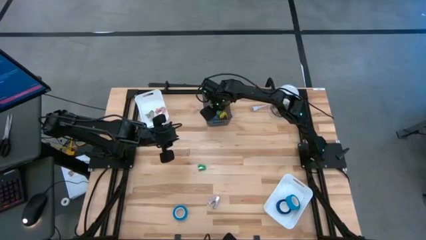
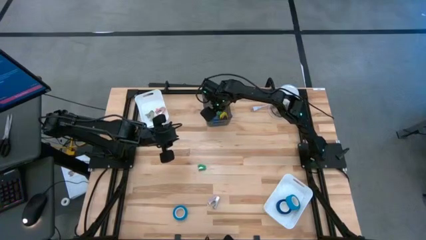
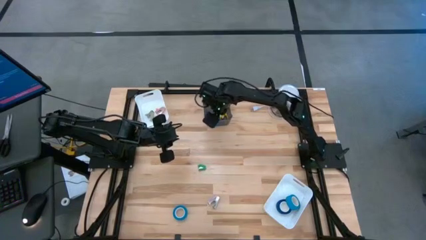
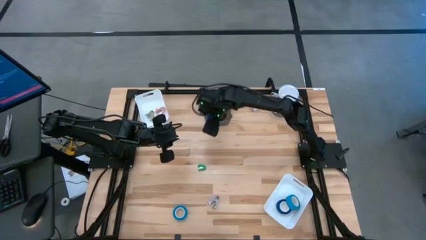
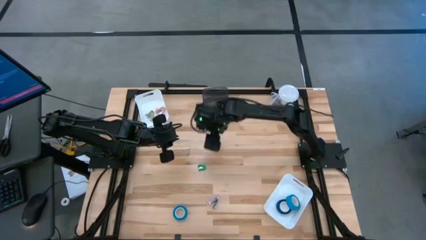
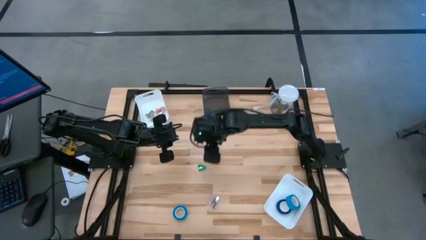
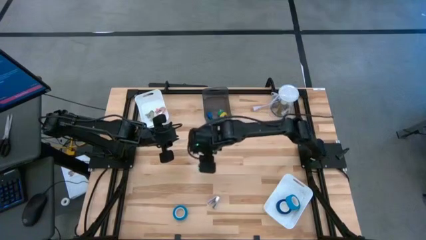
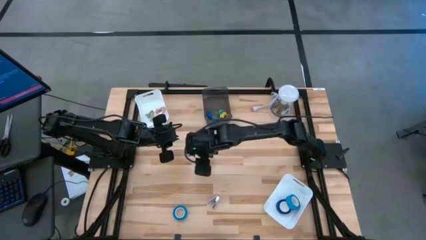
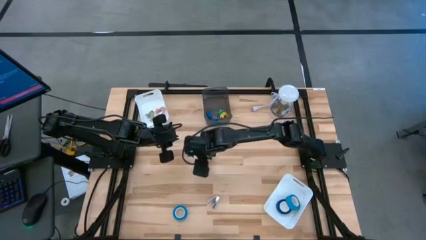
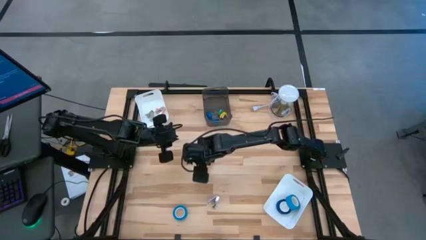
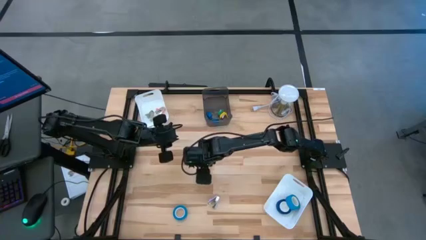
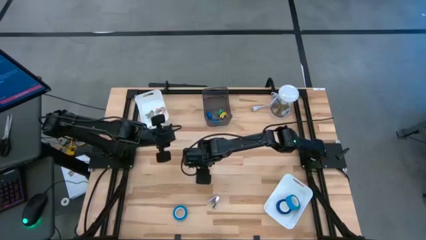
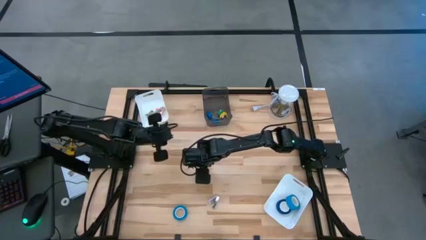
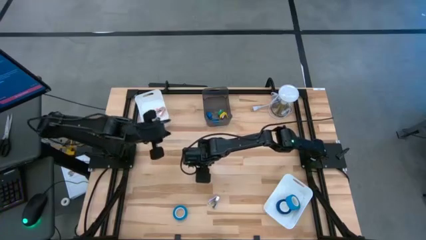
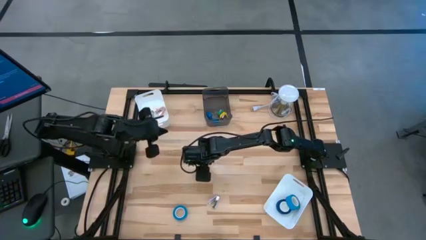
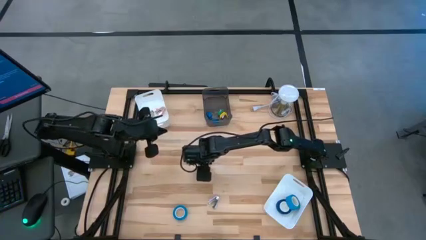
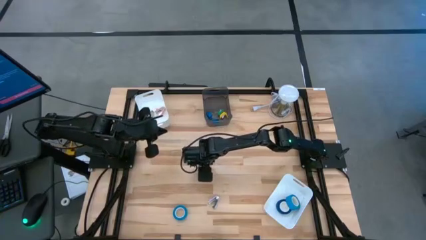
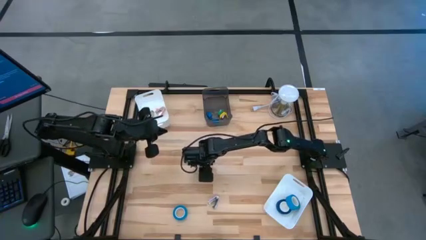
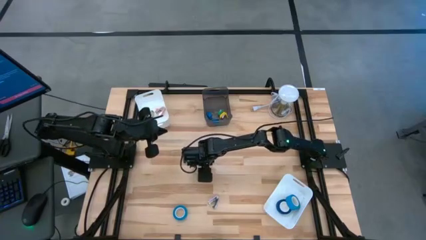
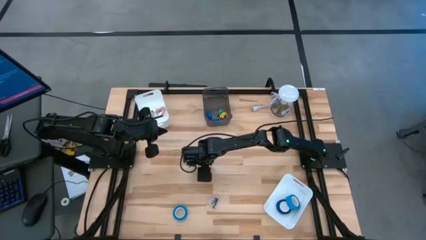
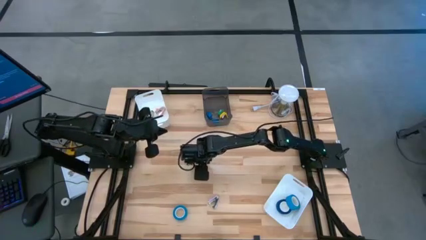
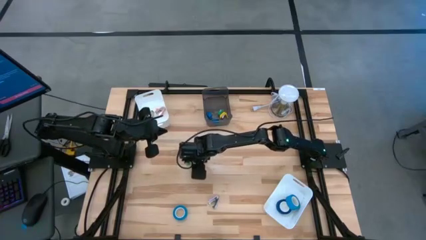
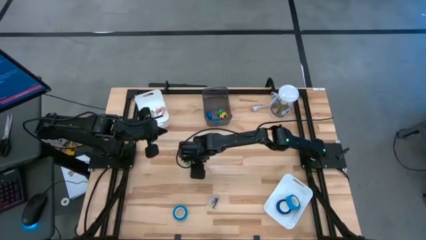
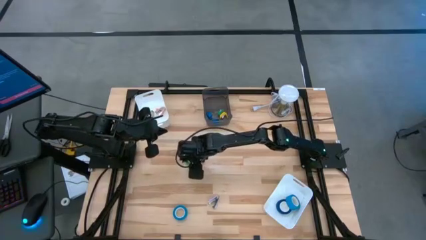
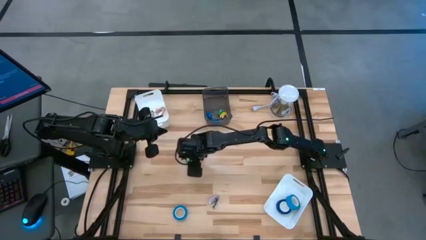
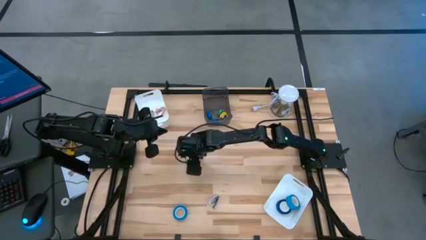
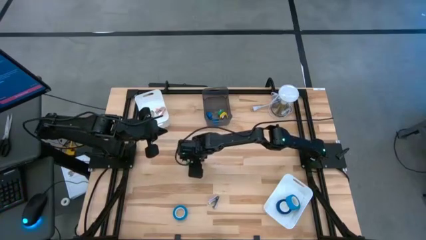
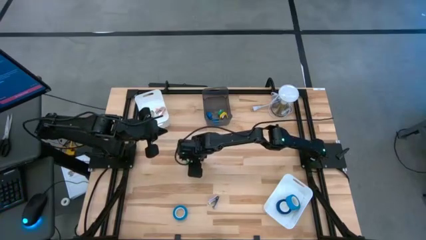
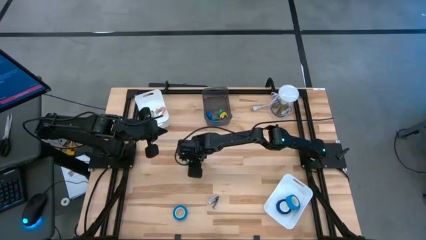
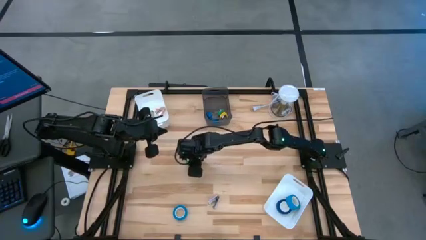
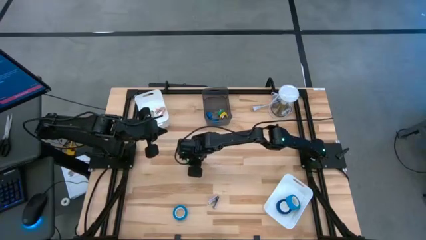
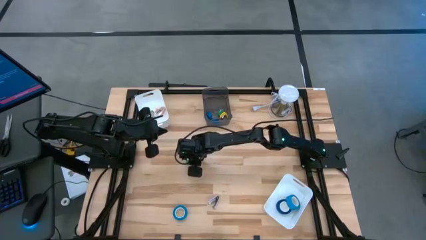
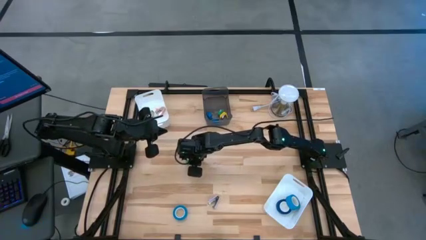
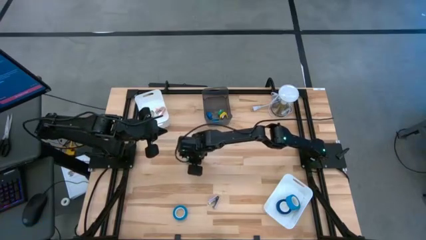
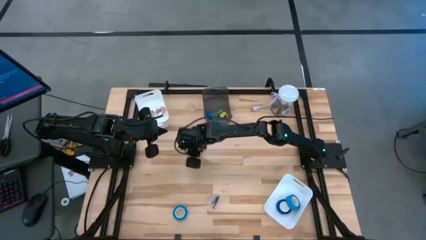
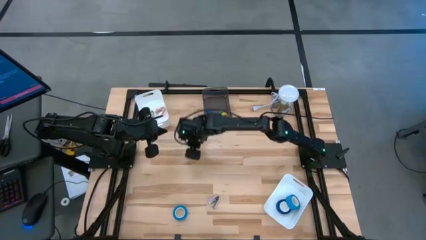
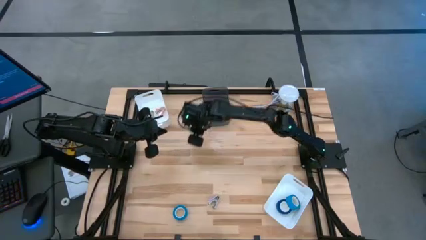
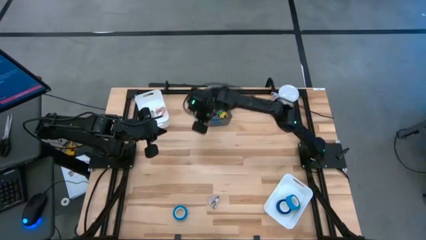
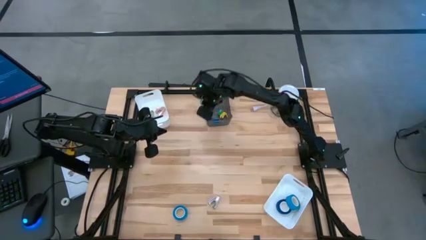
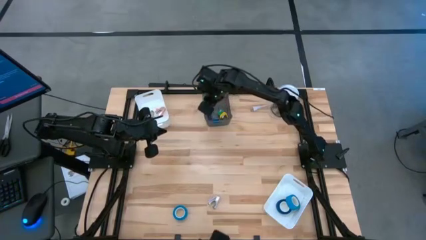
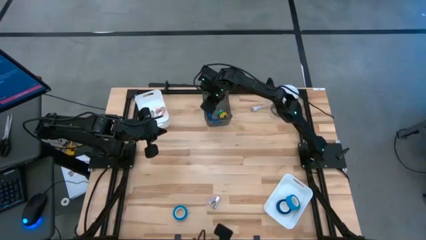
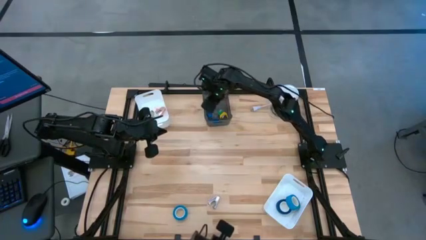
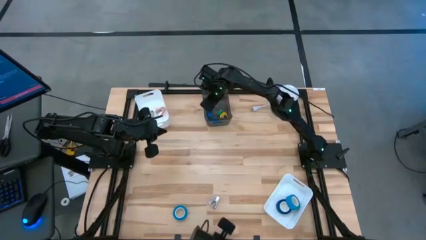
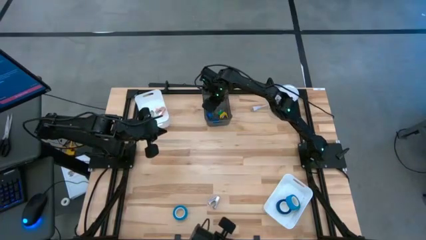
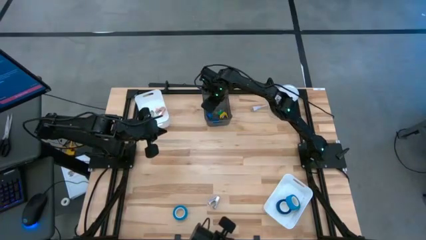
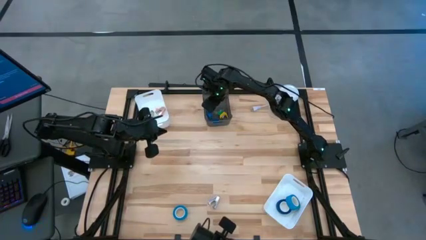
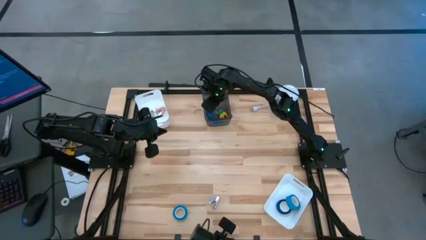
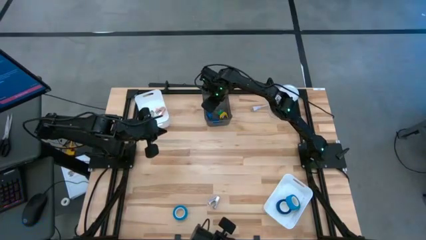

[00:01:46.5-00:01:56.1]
Task: Pick and place Stapler, Stapler remover, tape
Put the green stapler into the black bin

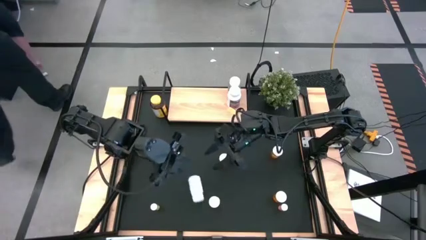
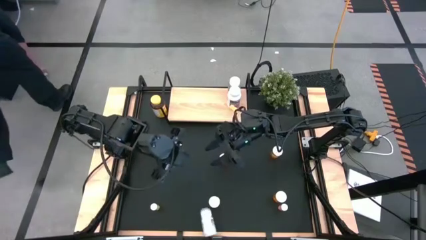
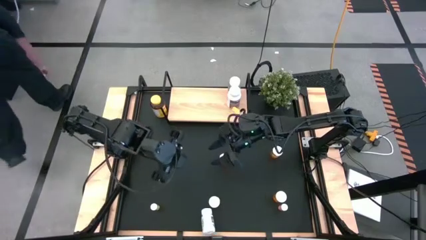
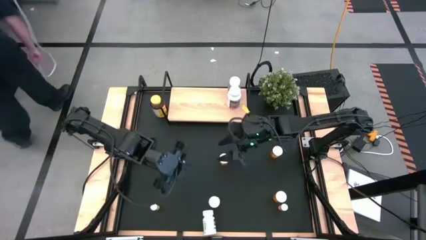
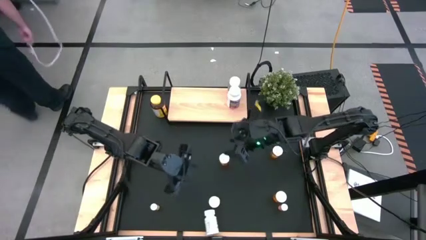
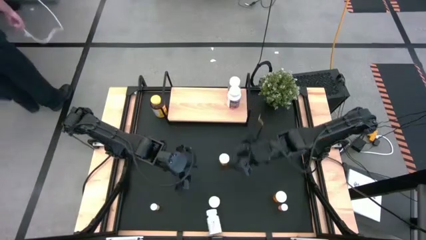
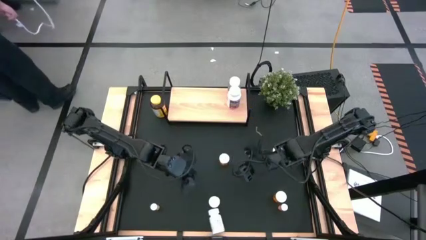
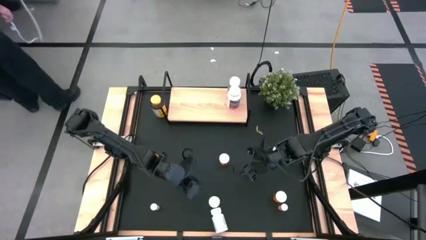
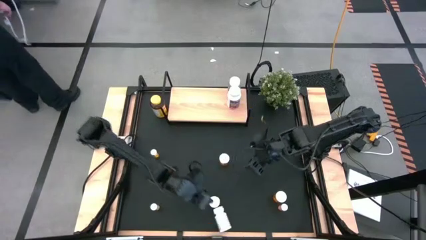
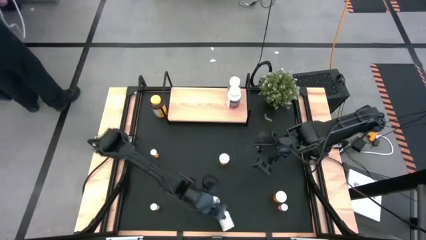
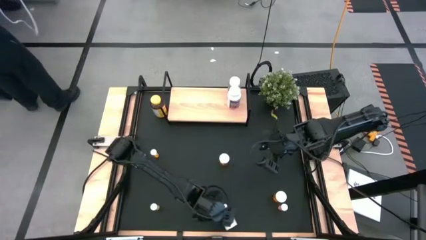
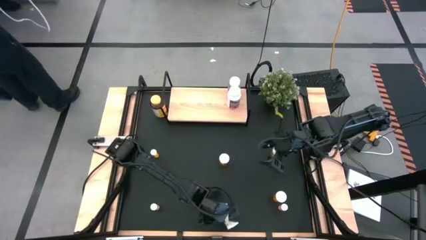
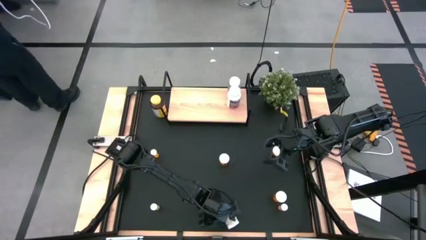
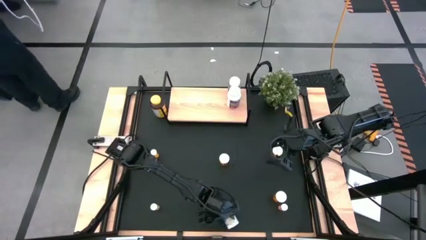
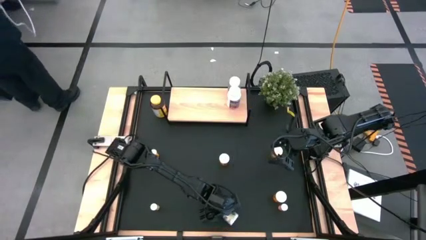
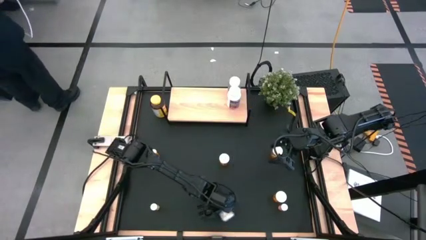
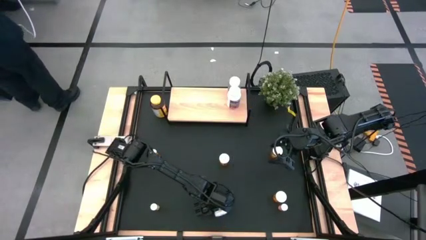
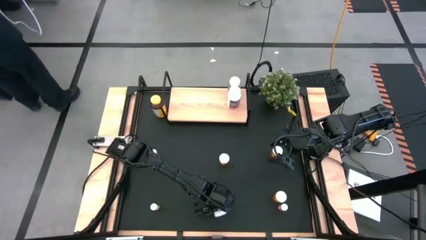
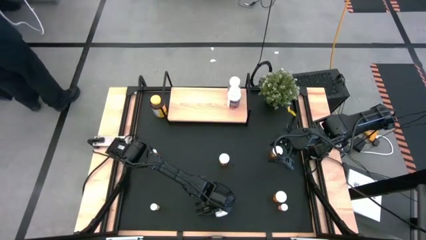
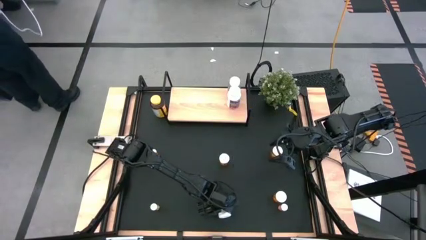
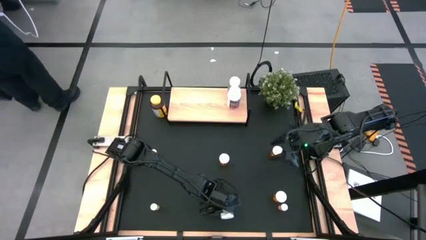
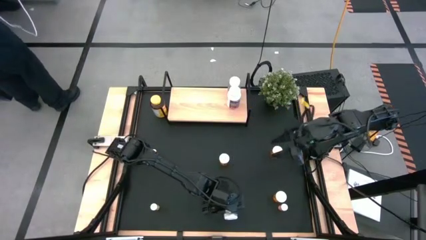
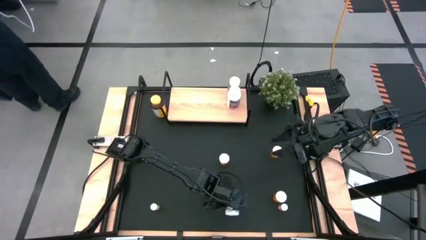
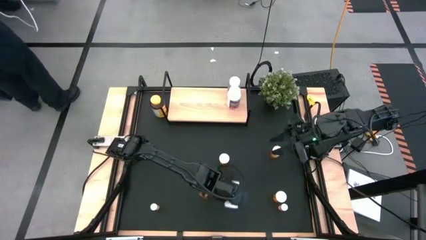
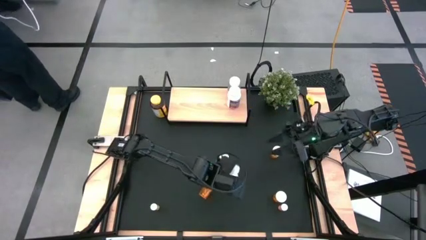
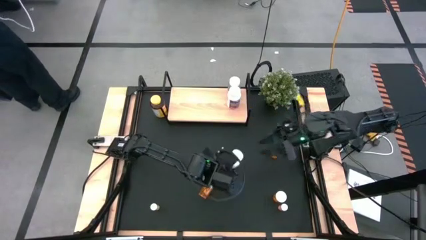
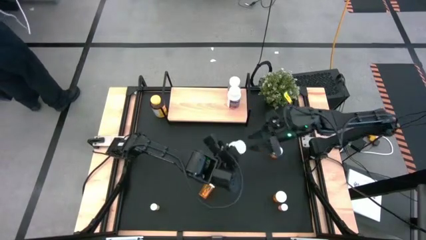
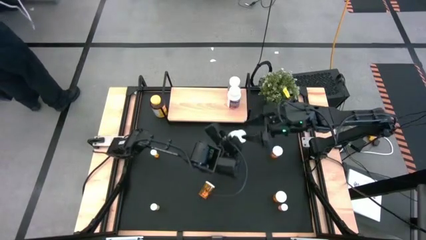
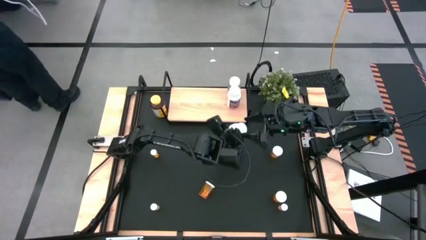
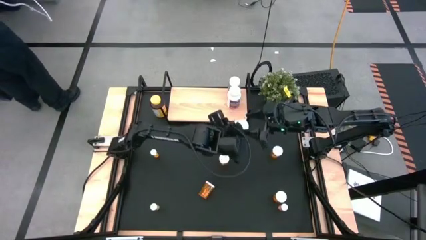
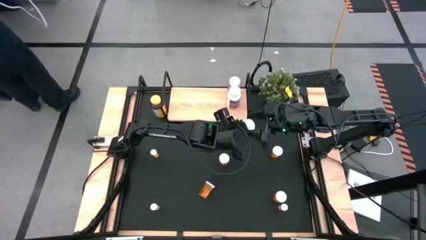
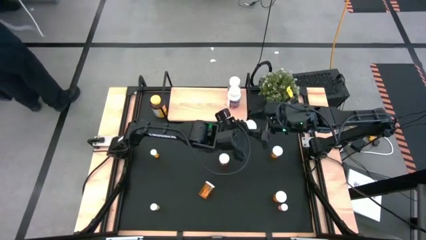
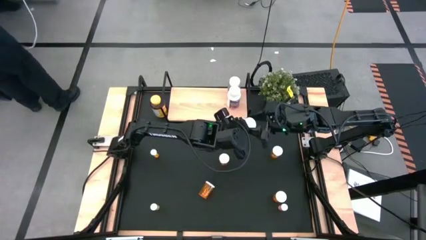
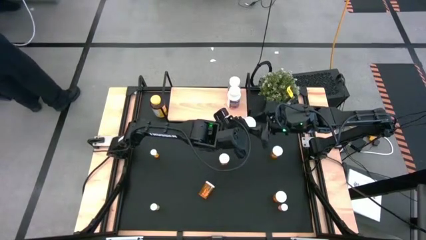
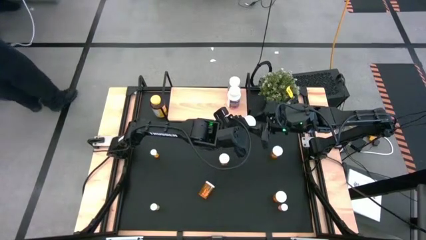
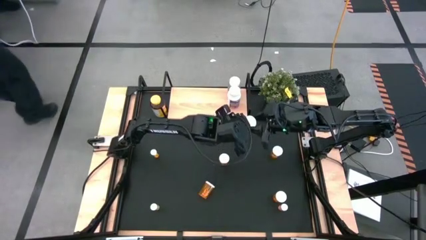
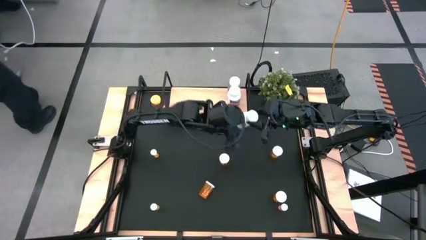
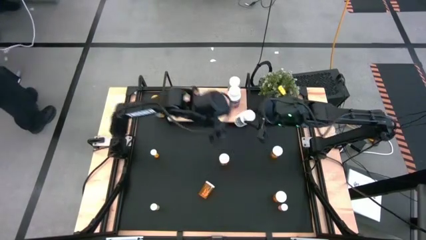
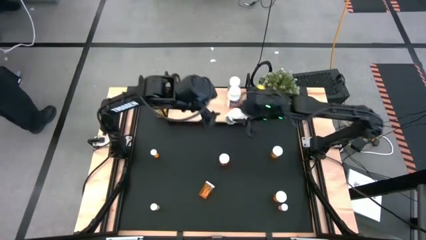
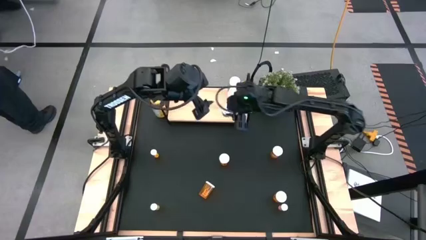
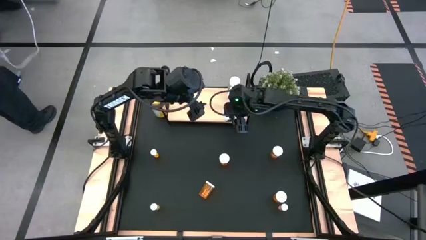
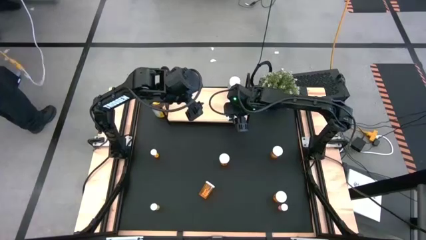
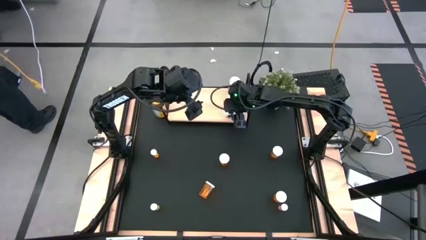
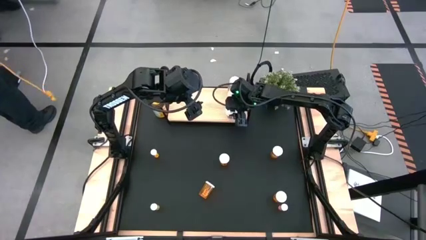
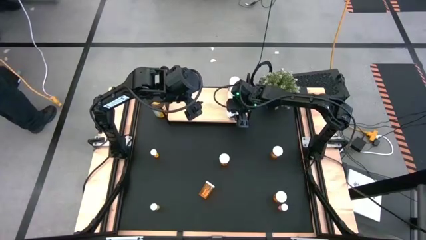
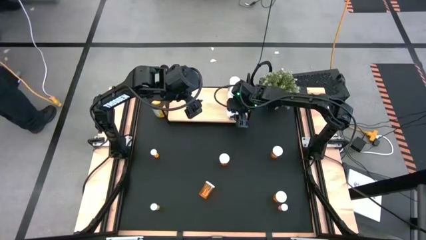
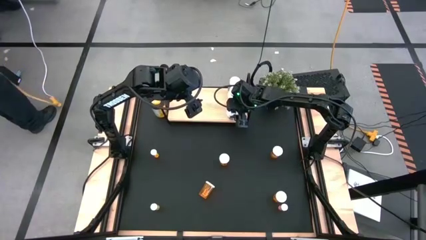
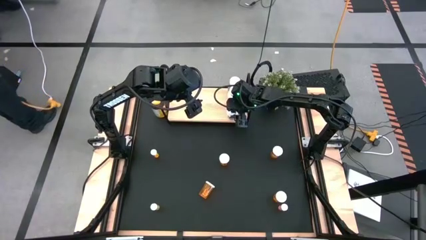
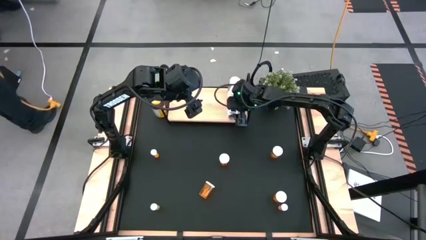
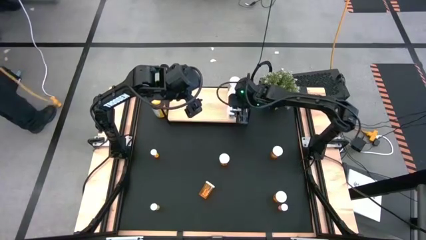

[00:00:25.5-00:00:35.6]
Task: Pick and place medicine bottles onto shelf by color
Put the white pill bottle on the shelf aligned with the other white pill bottles
